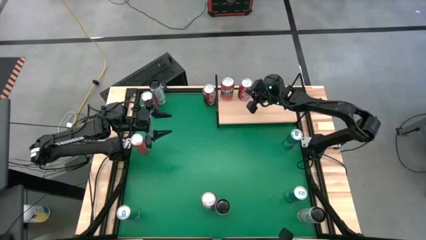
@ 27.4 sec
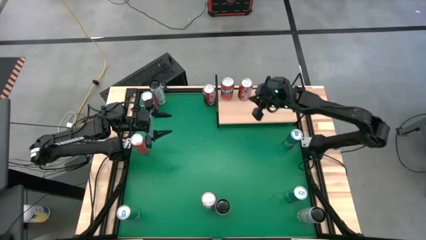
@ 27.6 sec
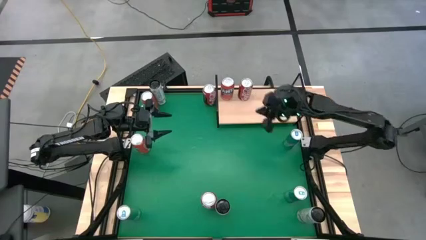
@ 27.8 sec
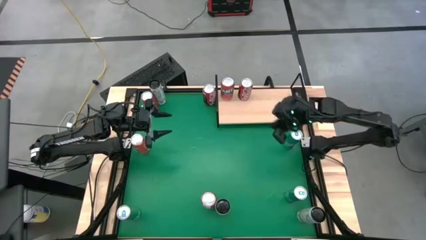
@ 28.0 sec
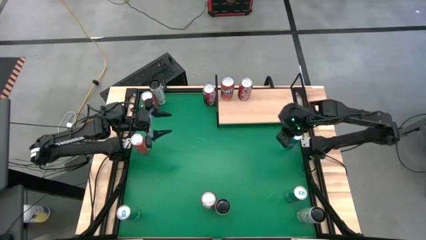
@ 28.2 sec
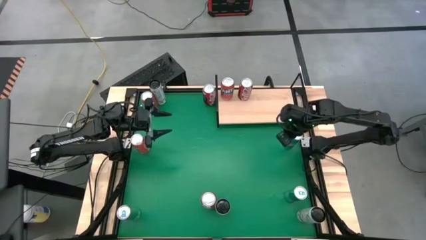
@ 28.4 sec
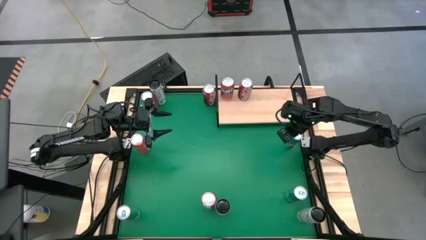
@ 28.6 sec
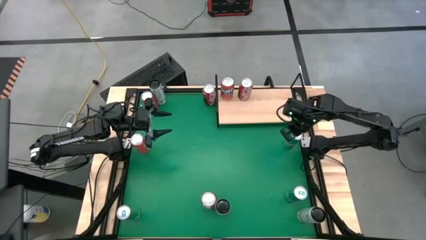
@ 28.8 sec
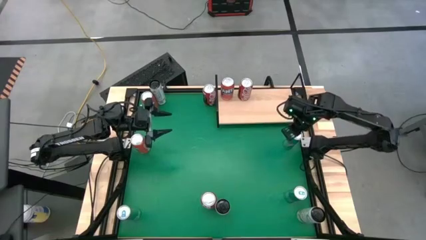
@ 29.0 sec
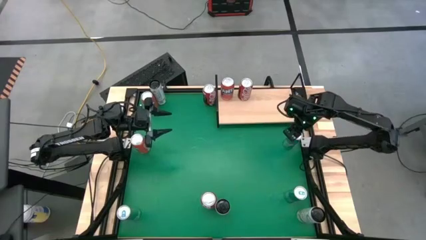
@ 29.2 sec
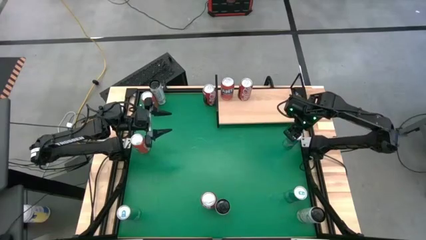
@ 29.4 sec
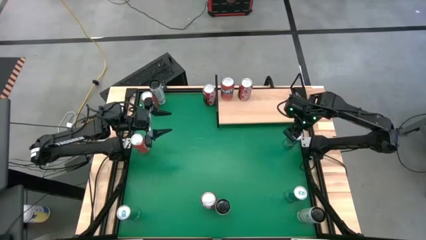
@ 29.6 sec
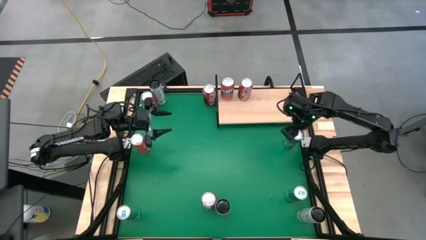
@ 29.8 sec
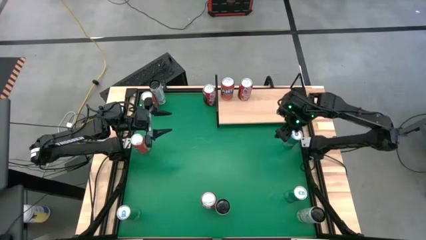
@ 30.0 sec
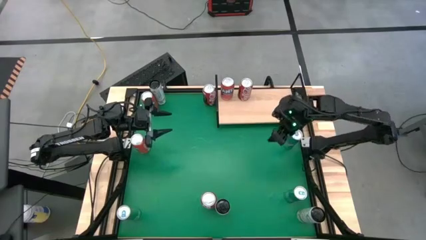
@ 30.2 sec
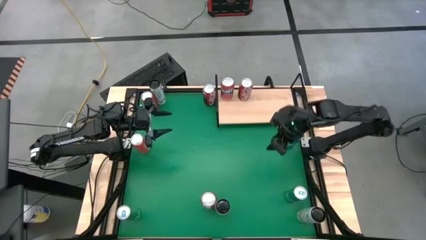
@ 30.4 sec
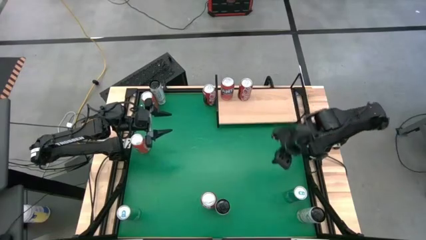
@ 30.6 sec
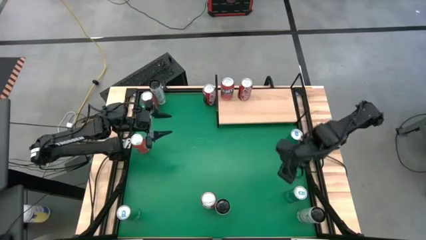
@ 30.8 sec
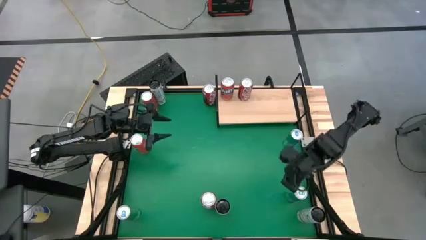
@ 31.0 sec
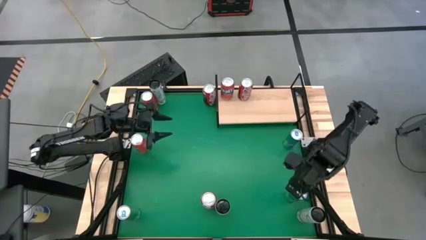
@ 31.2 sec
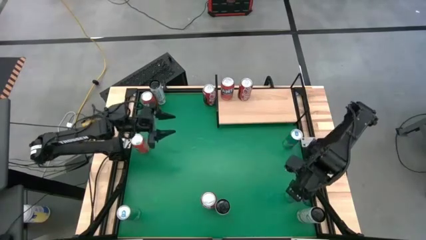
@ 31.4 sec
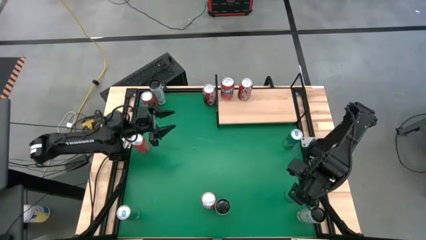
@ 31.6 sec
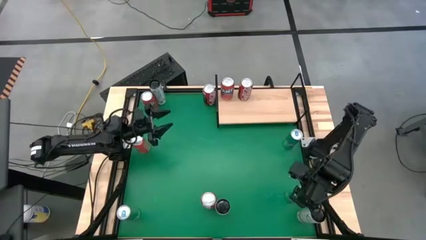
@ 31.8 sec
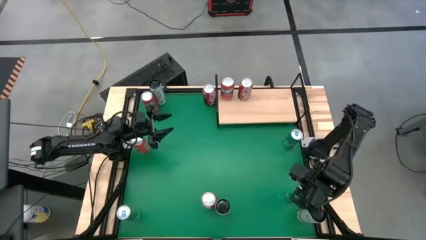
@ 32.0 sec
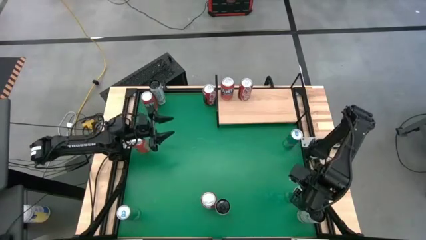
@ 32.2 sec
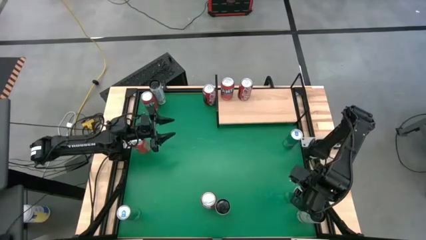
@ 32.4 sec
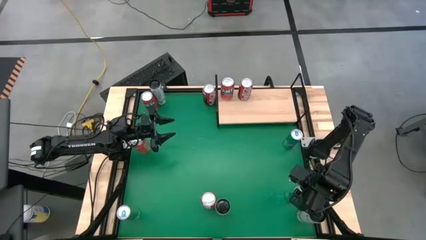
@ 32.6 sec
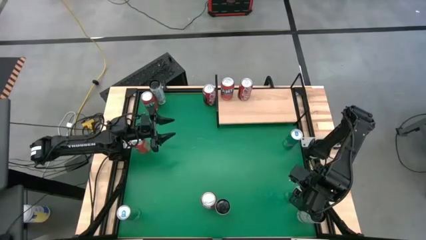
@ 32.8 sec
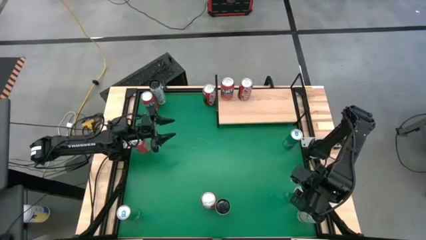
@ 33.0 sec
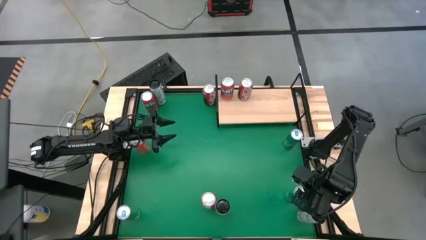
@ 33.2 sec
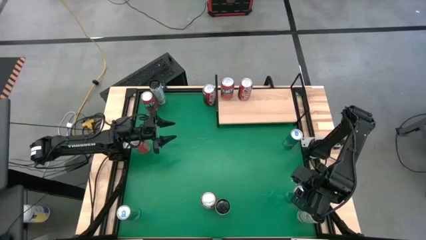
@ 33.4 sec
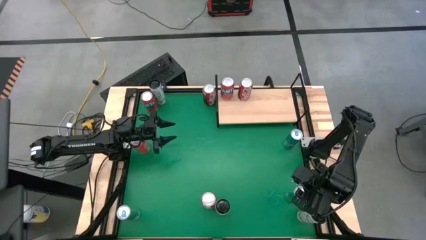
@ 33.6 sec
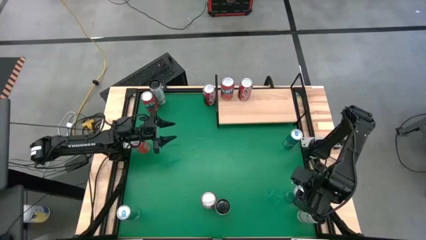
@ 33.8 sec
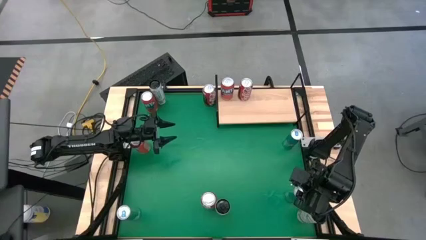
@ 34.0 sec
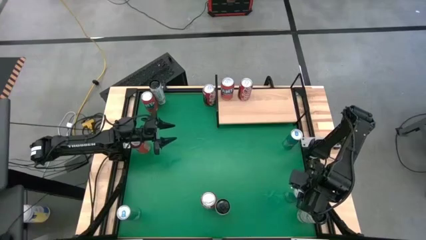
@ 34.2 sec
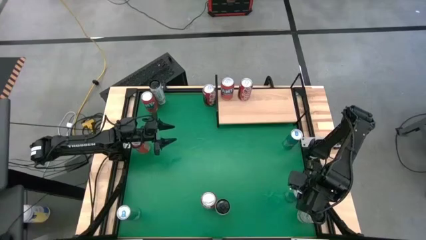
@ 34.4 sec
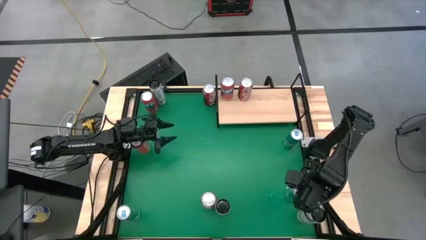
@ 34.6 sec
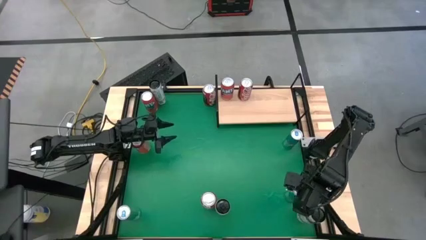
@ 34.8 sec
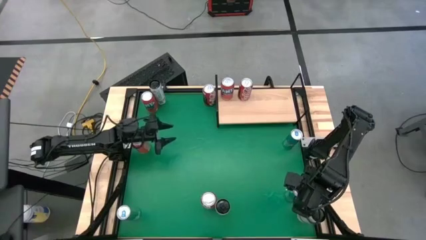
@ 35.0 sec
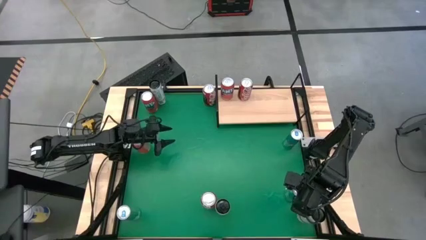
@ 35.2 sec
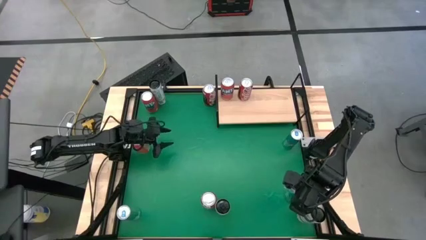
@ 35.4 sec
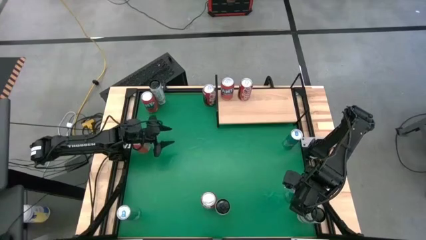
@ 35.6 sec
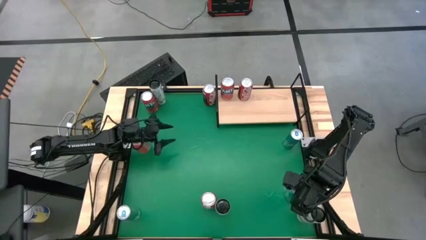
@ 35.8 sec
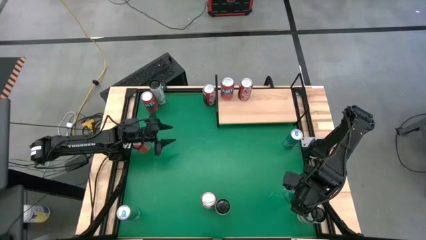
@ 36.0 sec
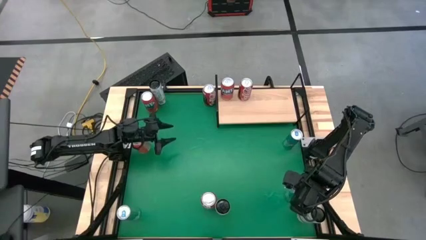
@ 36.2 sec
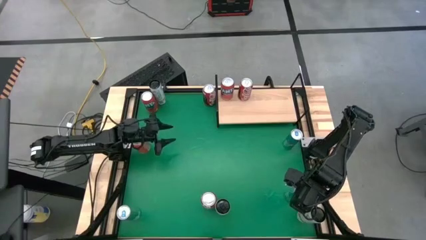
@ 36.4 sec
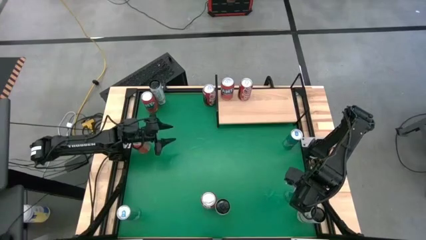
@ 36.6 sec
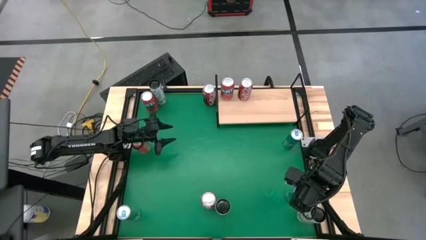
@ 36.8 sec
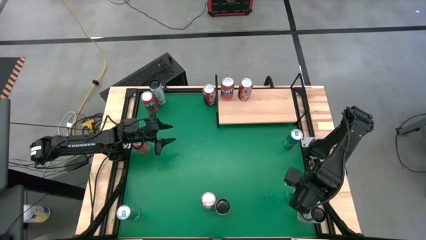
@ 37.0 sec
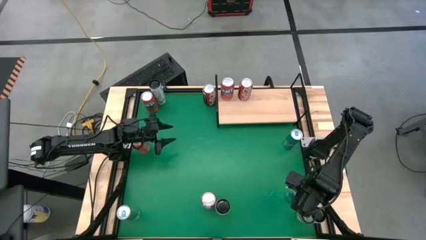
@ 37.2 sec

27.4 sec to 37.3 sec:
Task: Place canned beverage on shelf
Put the bottom right blue soda can on the shelf
